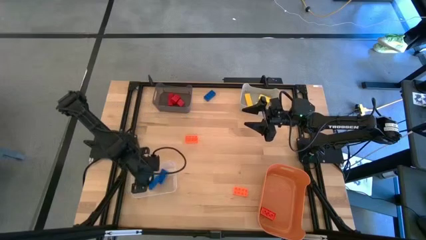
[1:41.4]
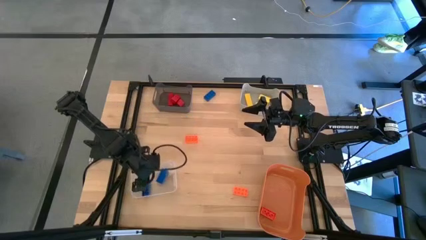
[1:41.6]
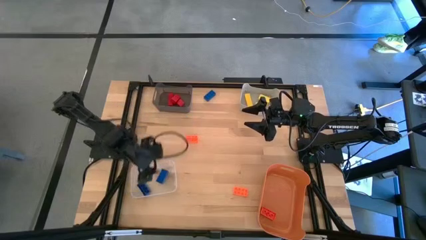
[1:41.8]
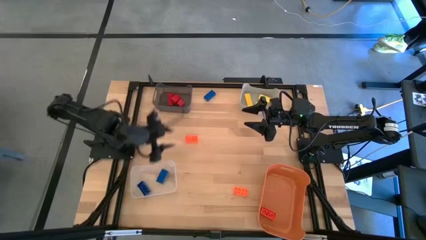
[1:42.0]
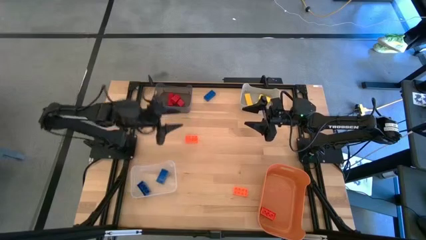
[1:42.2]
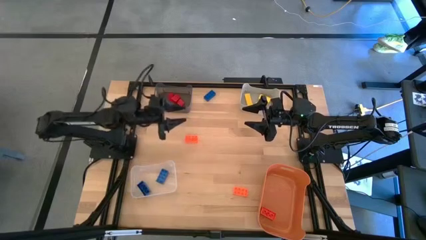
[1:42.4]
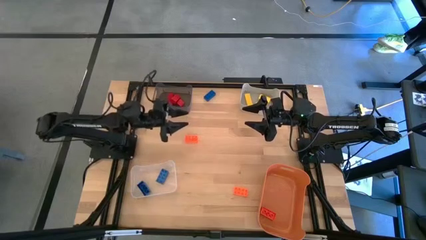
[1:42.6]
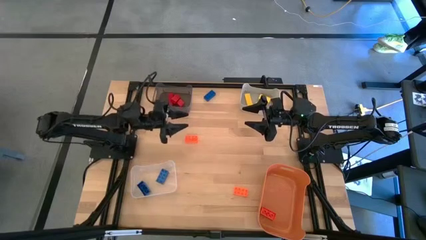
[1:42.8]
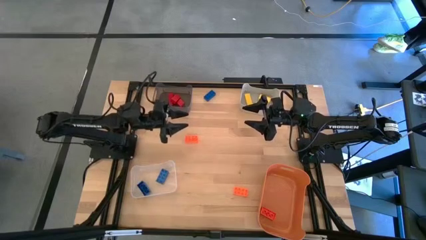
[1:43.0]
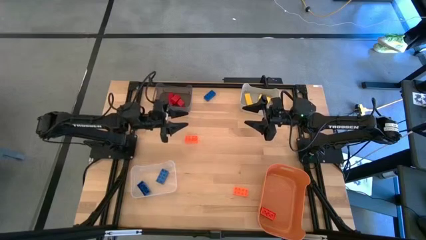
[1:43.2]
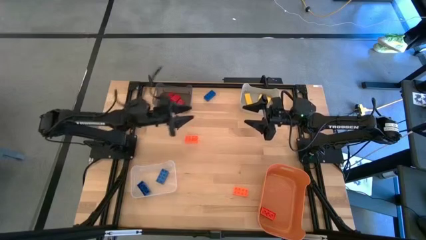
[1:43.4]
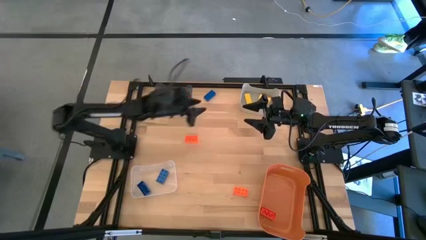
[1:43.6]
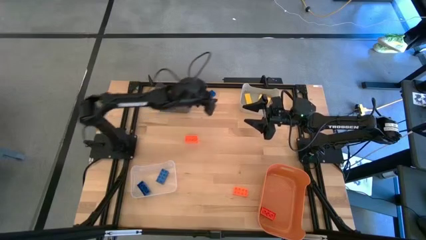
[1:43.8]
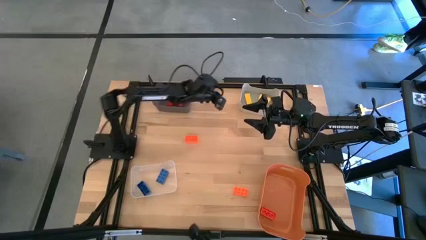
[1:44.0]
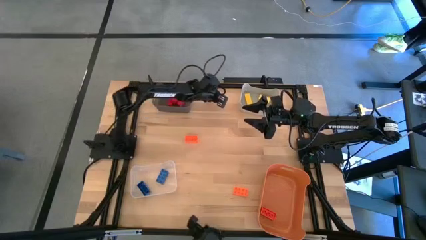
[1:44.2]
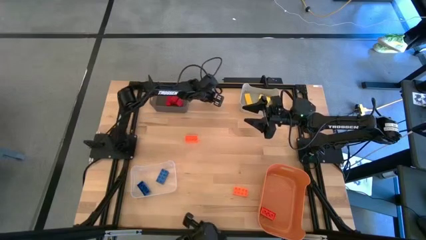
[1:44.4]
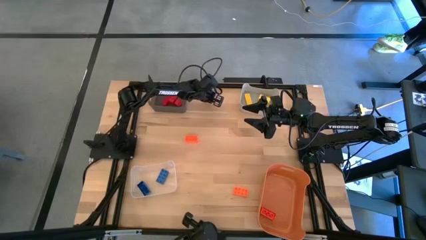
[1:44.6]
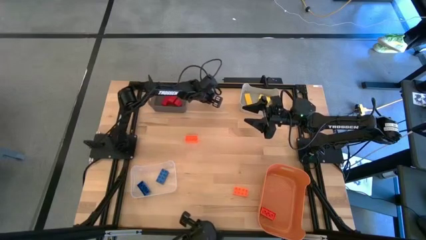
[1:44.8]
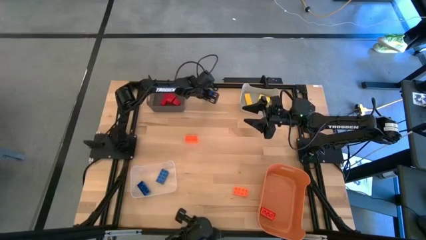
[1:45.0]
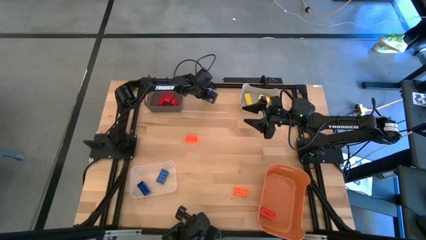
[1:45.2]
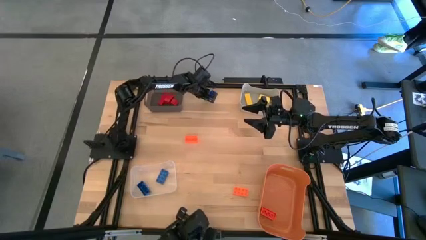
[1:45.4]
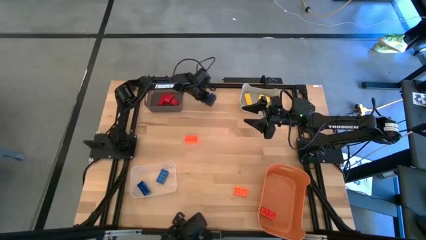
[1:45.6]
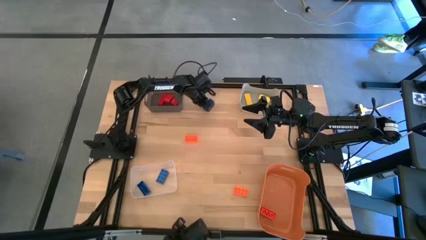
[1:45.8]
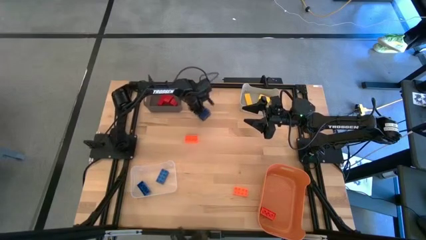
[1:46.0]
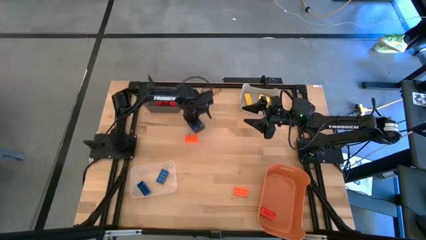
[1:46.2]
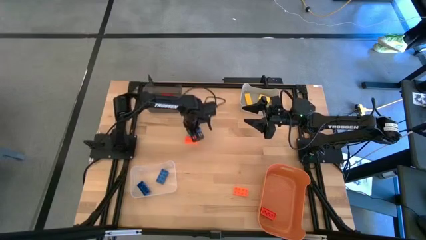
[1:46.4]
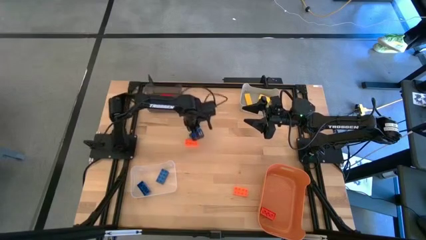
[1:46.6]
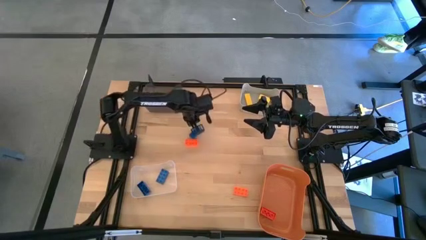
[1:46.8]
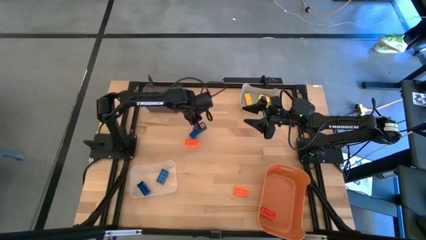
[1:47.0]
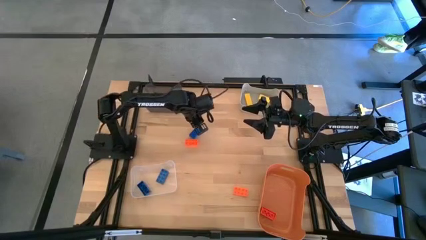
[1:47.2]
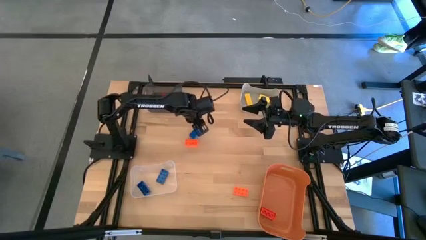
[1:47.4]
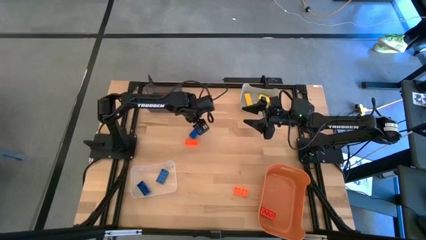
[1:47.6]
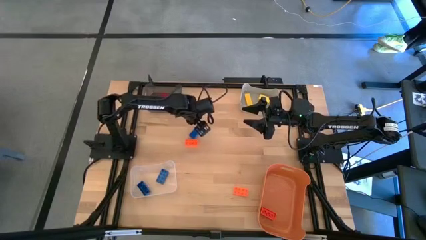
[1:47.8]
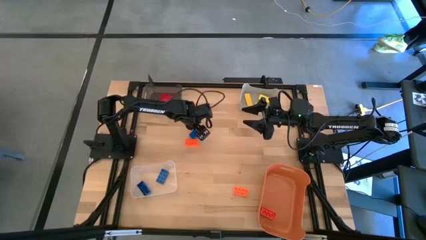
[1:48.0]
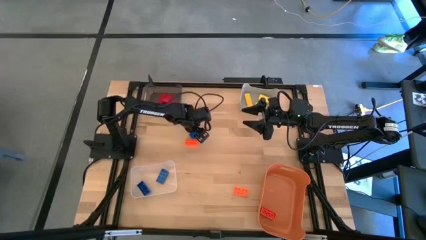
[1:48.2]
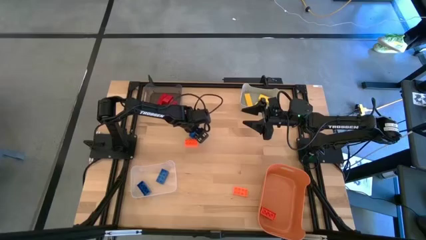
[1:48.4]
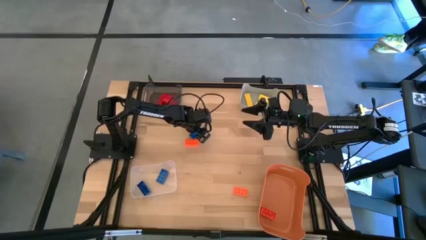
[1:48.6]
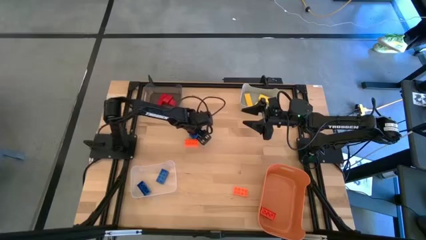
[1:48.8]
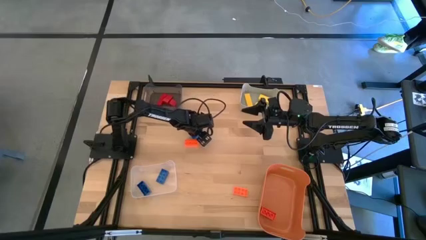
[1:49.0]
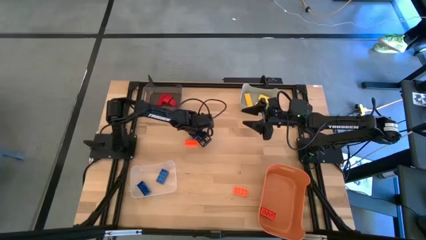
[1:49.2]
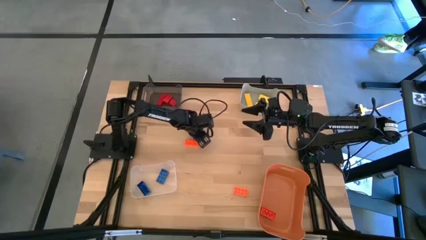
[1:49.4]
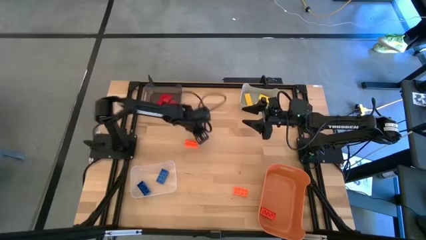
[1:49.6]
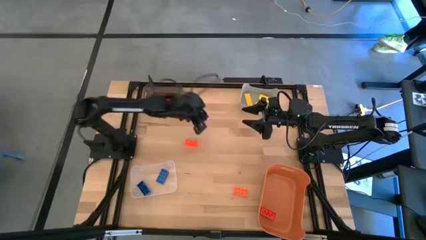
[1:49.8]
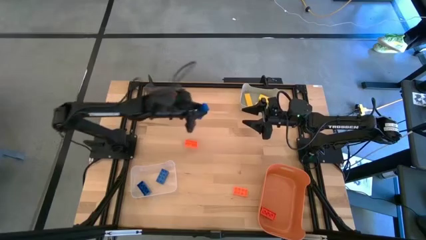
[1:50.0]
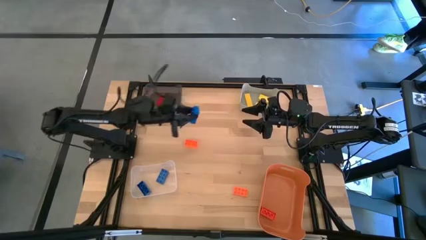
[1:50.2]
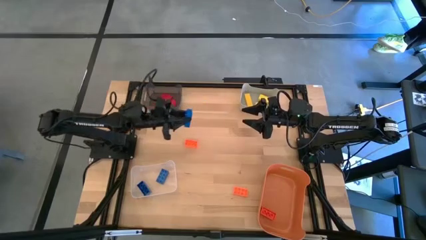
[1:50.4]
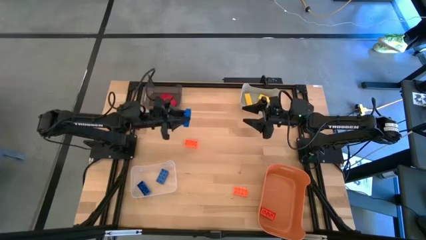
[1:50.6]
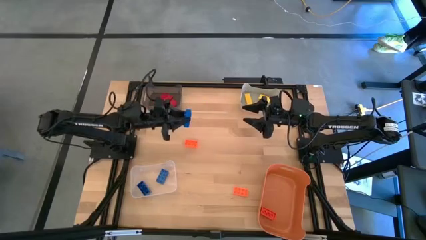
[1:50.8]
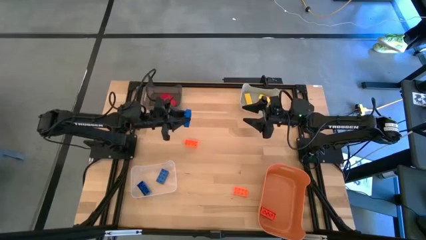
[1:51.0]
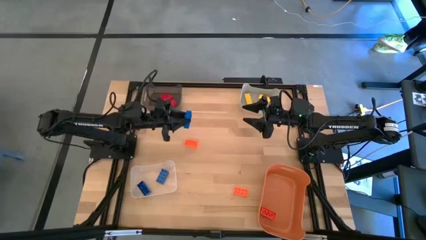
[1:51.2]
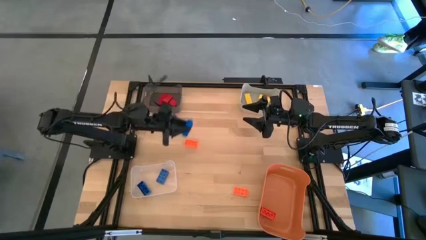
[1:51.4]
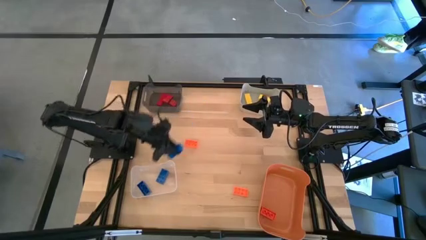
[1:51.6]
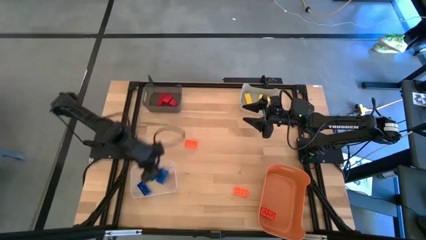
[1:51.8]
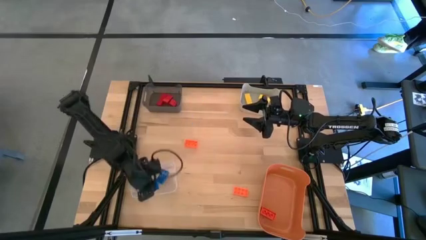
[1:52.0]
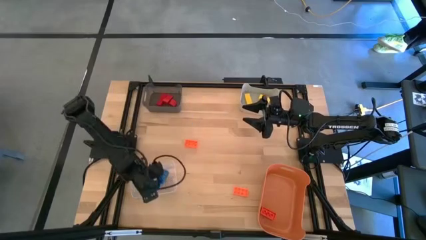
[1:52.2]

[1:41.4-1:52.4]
Task: Sort & place blocks by color
Put the blue game piece into the transparent bin
